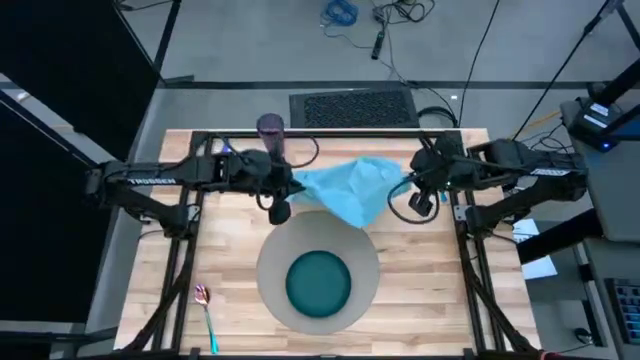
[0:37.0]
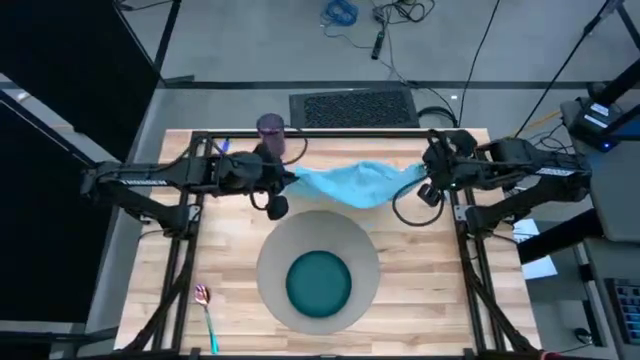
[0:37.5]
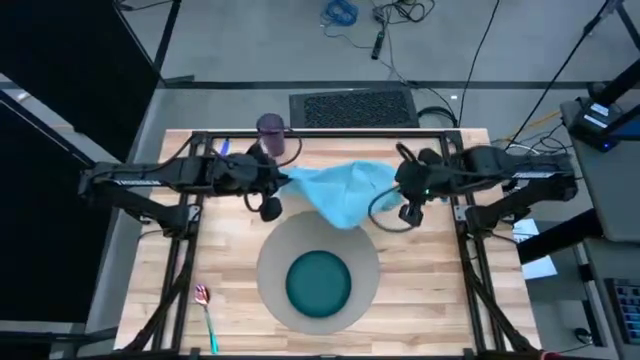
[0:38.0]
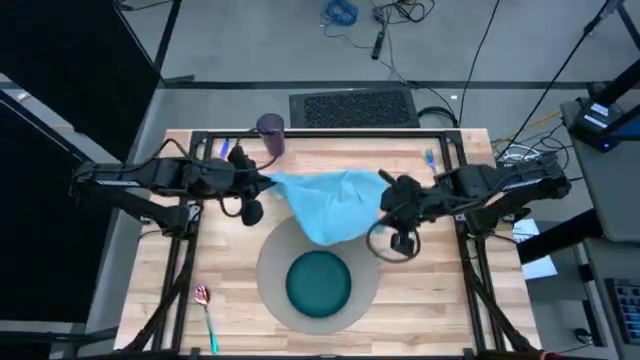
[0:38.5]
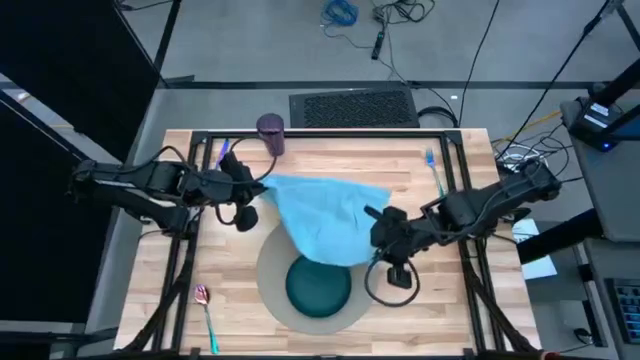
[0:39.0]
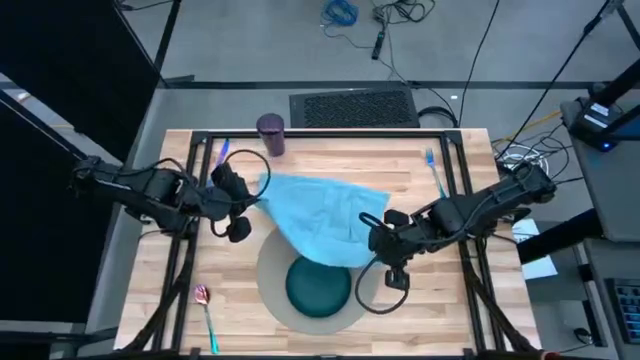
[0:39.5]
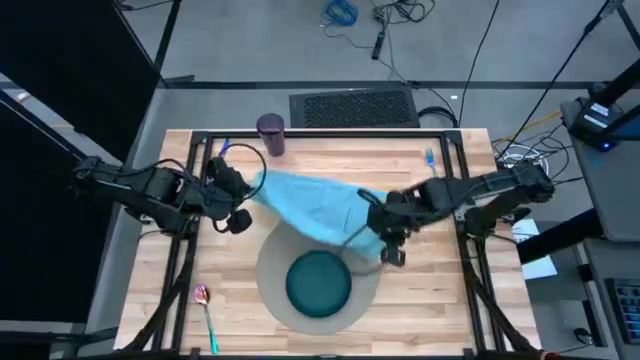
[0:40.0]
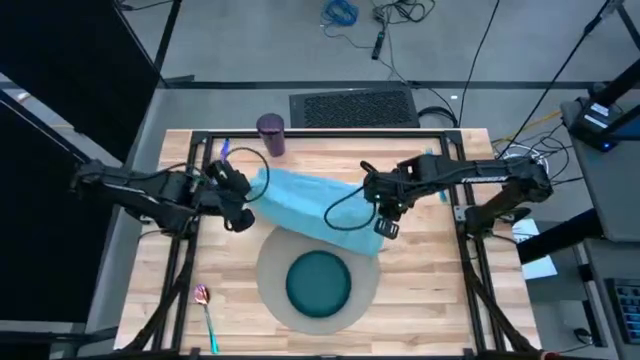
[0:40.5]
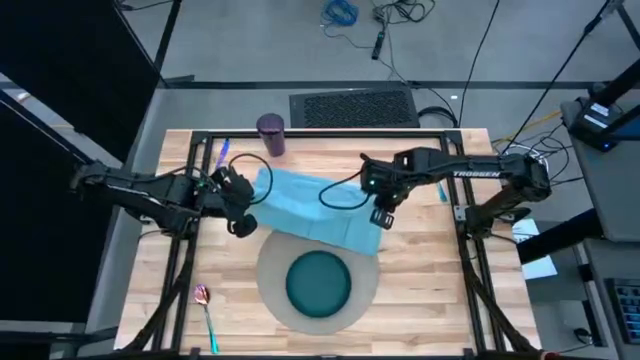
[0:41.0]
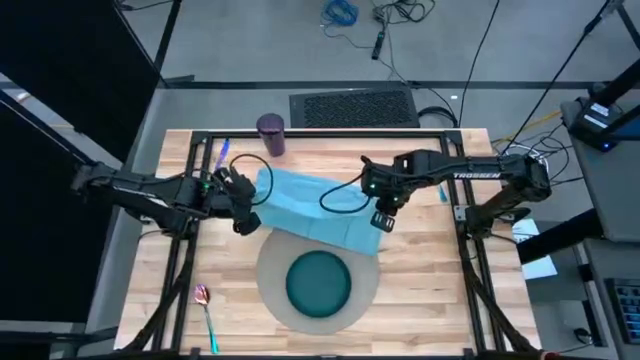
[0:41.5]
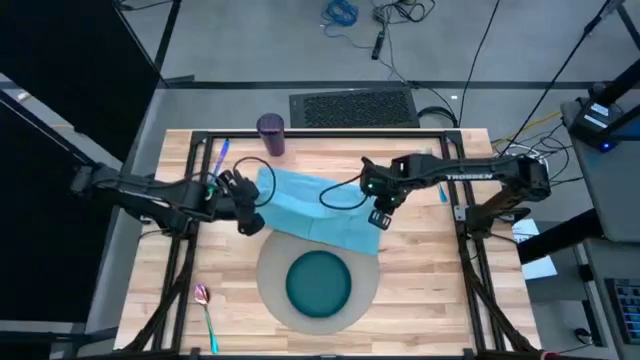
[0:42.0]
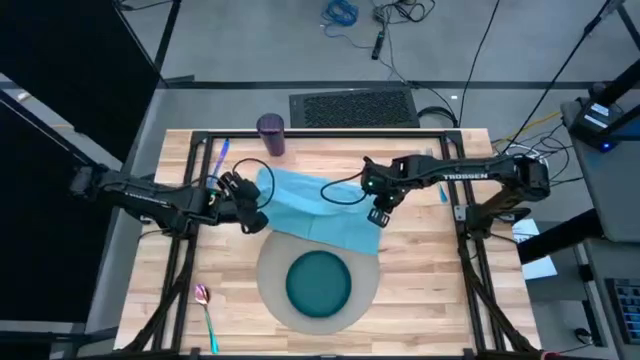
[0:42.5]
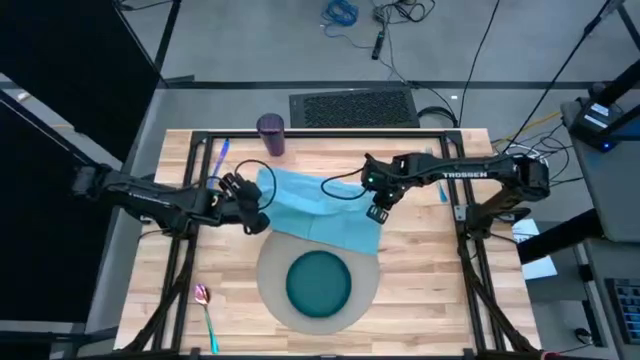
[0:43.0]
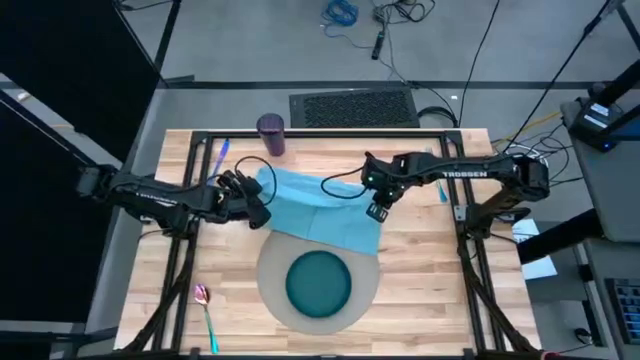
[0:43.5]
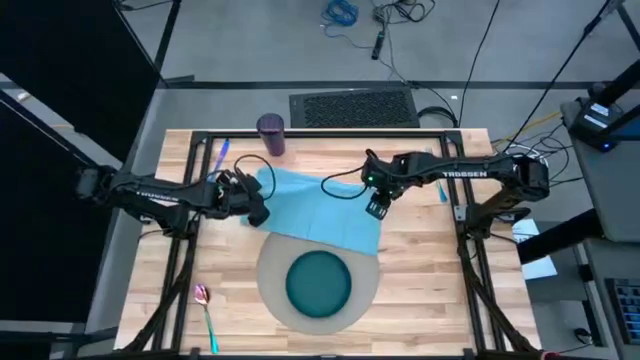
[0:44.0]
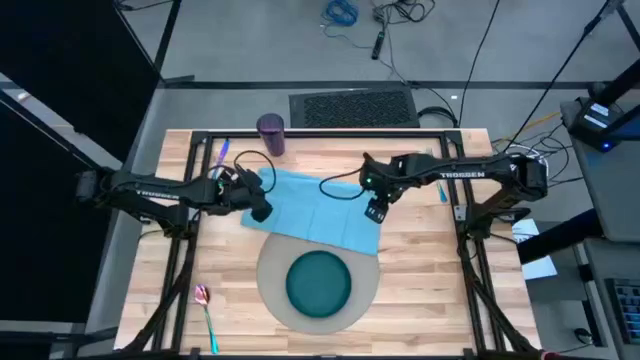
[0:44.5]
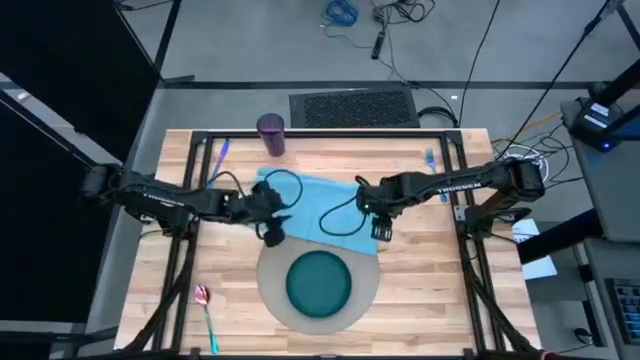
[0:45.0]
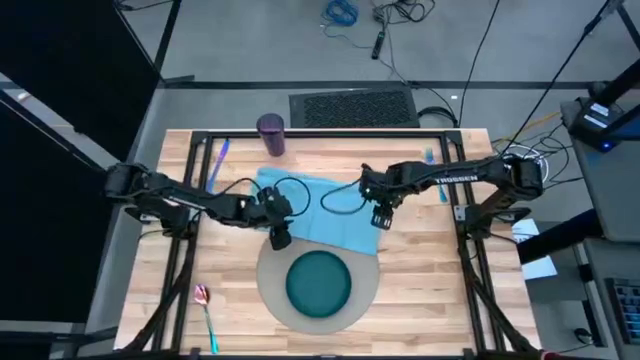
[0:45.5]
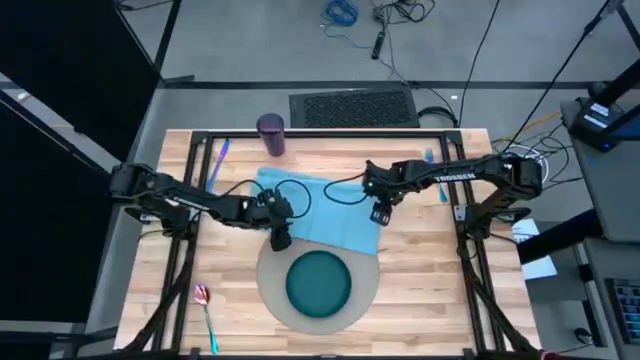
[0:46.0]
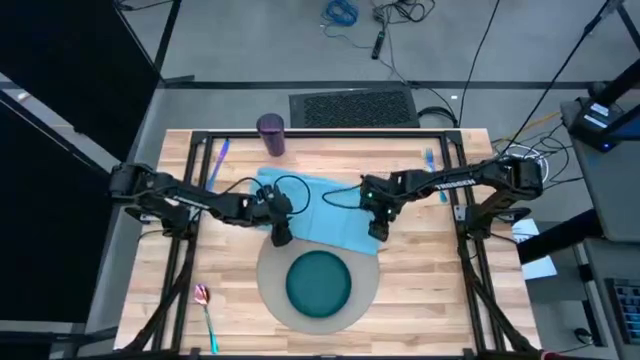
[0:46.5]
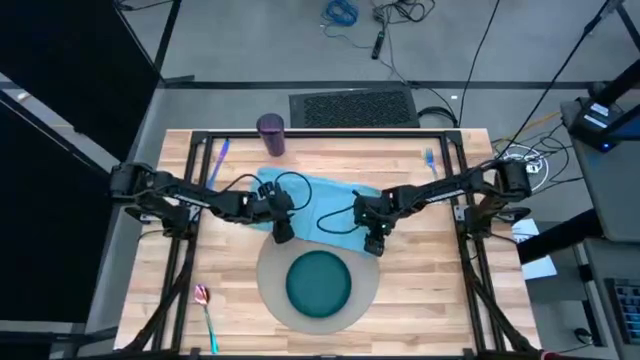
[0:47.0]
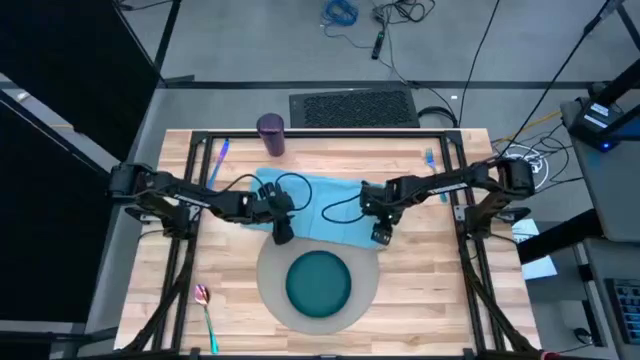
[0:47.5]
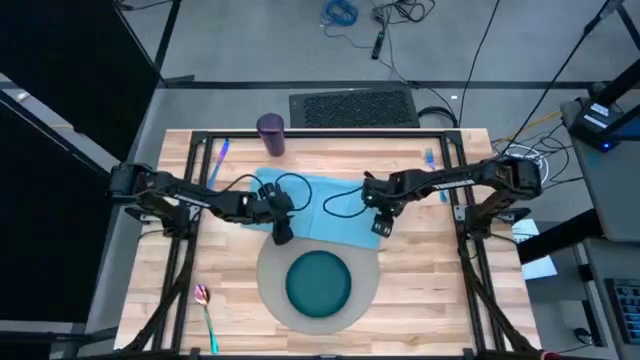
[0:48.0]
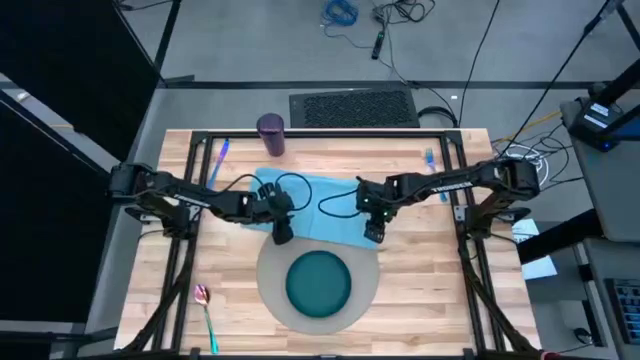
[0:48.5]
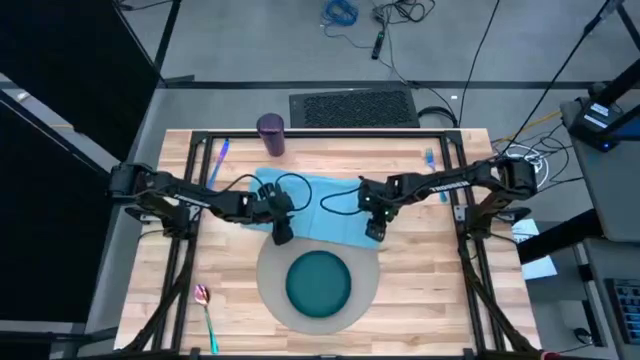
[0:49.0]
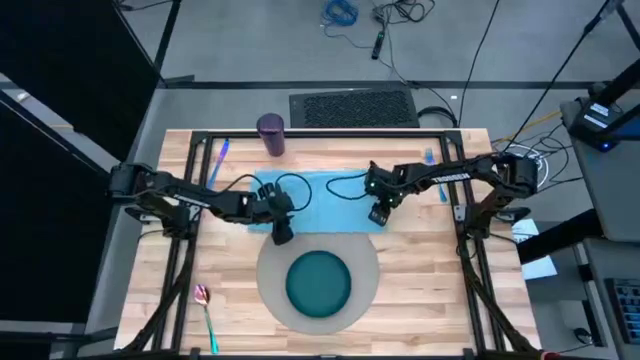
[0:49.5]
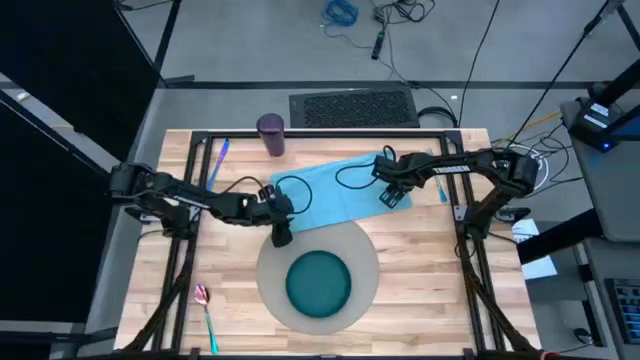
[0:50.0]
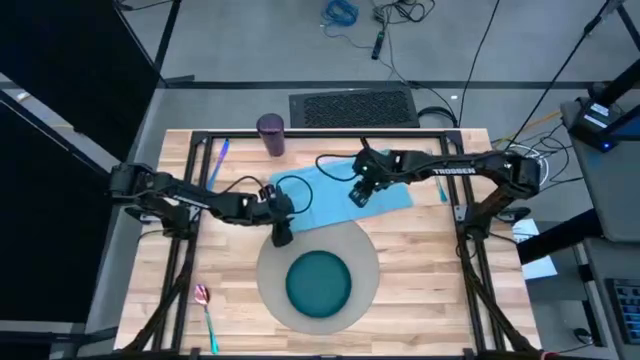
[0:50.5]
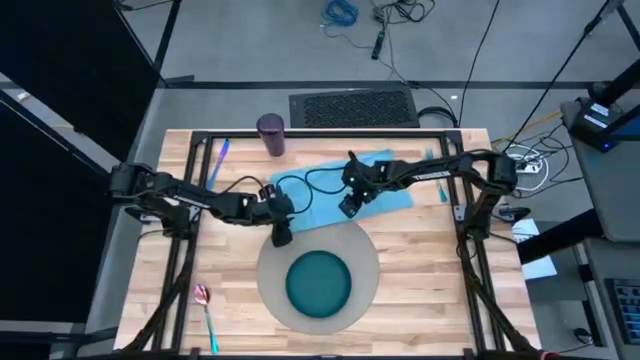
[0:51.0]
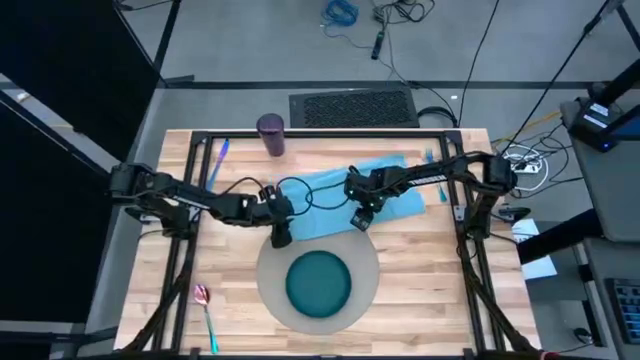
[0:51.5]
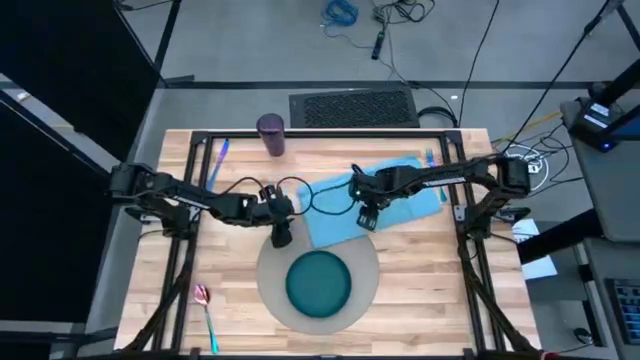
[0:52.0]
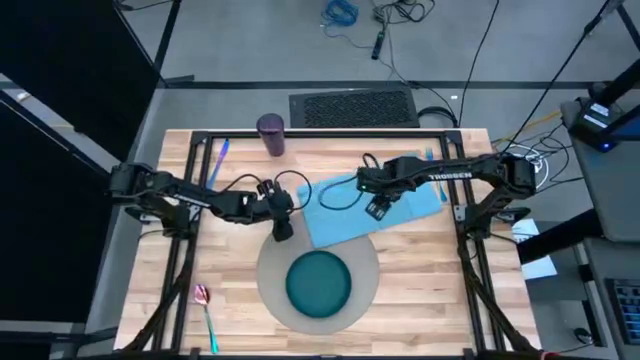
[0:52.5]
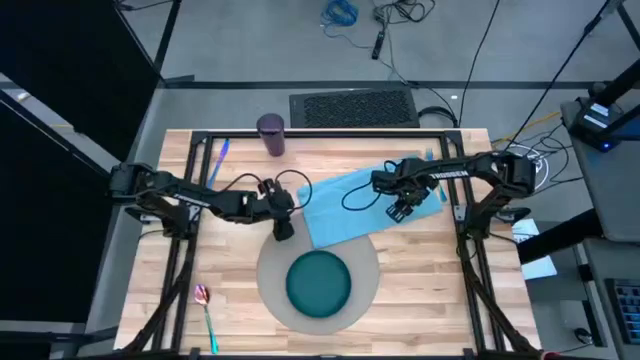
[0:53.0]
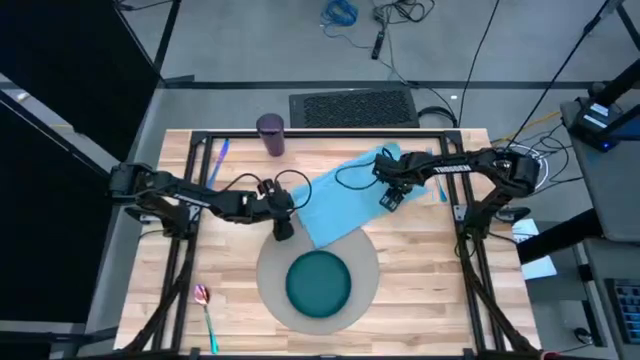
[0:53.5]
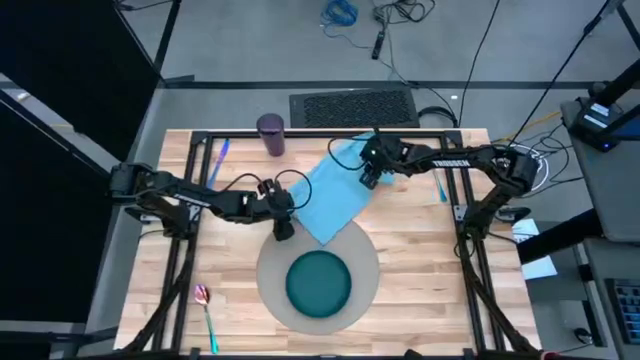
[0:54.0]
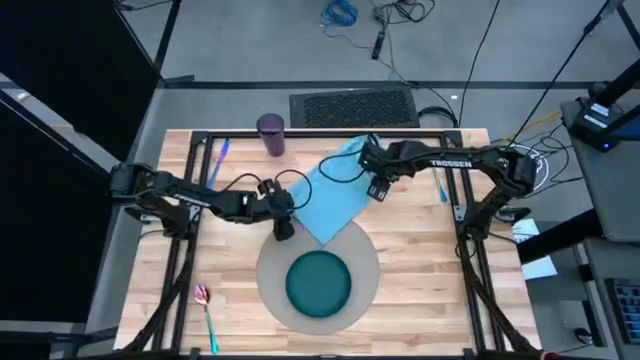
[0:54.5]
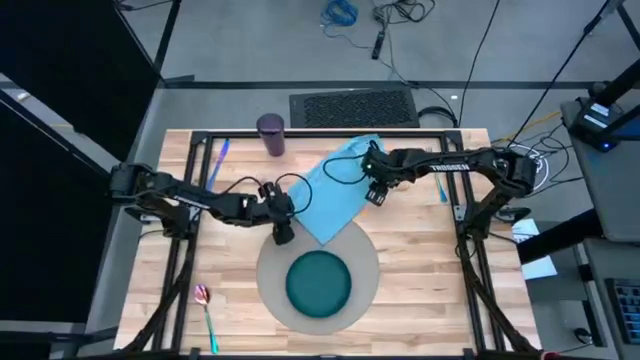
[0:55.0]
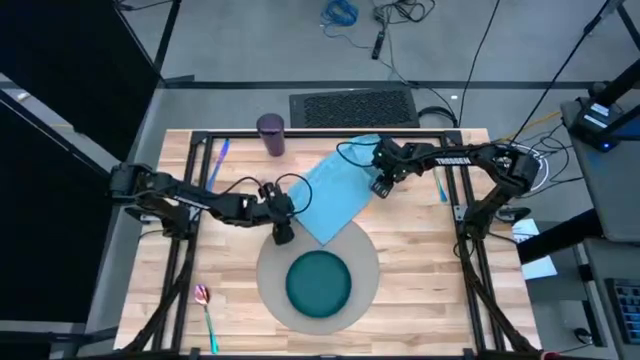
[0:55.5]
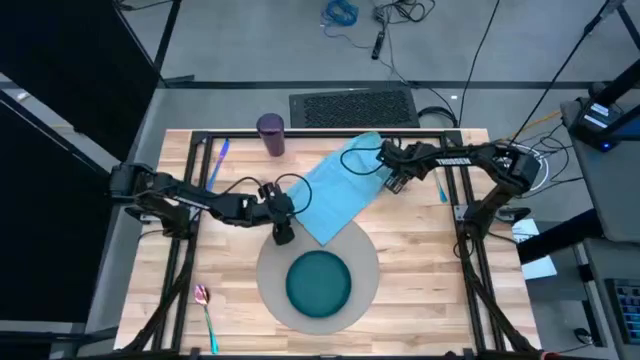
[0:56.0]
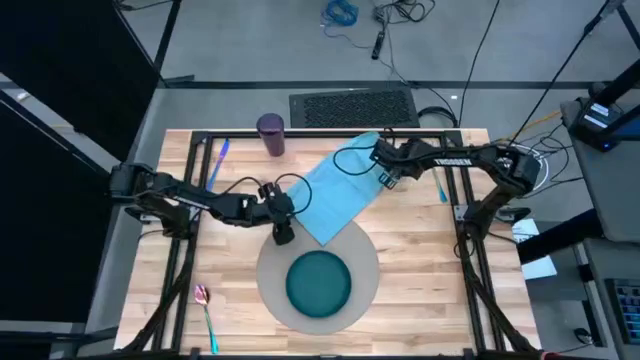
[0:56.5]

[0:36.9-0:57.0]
Task: Set table place
Fold the blue table napkin

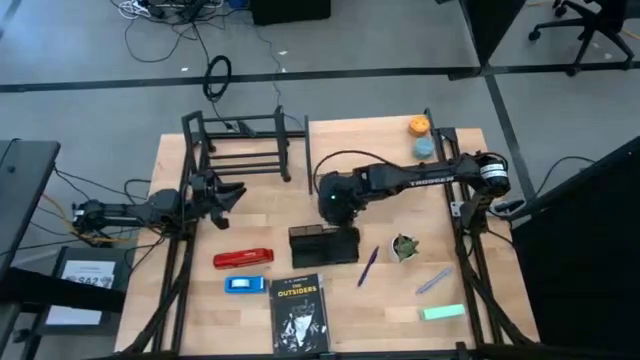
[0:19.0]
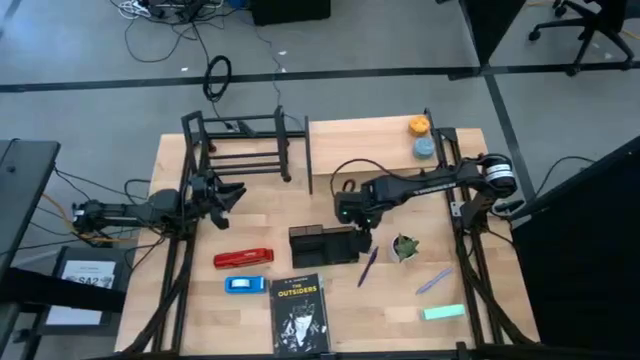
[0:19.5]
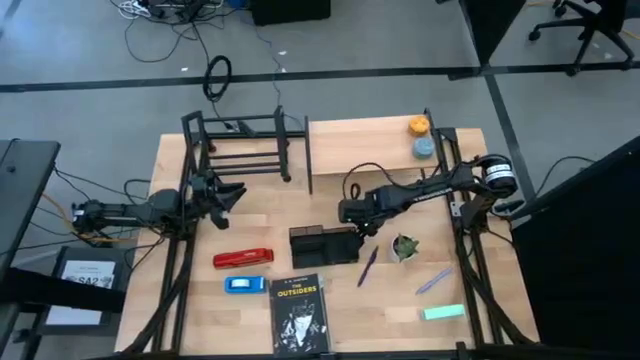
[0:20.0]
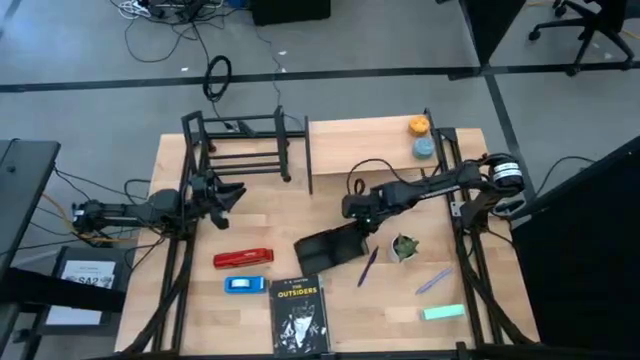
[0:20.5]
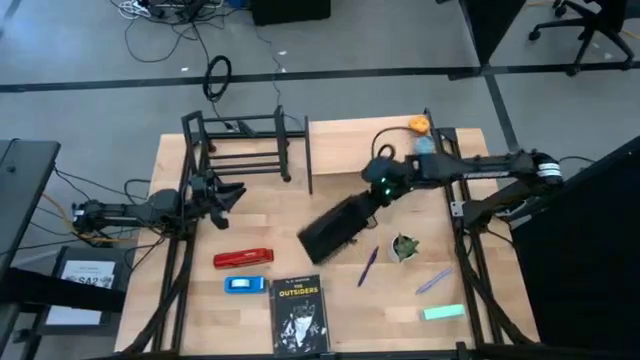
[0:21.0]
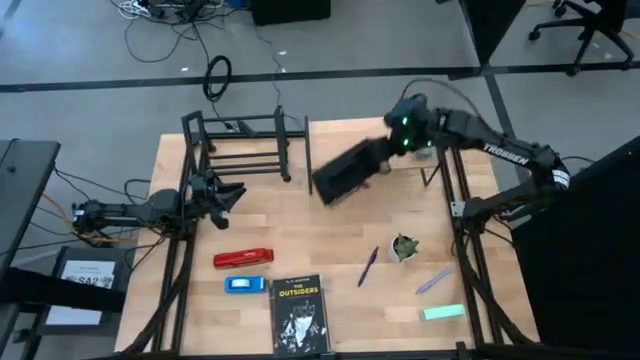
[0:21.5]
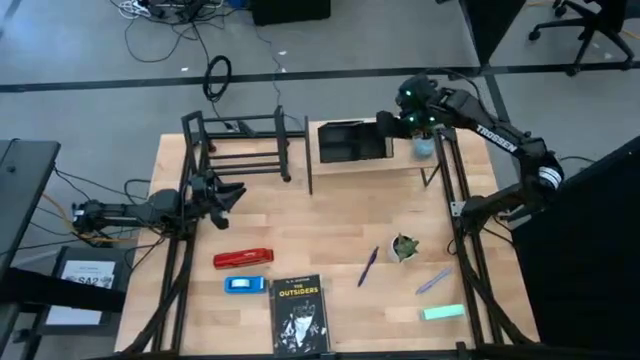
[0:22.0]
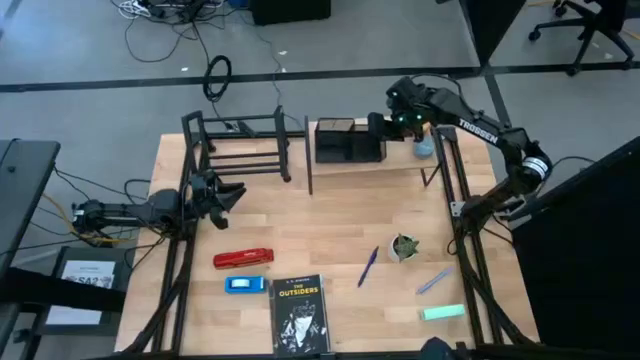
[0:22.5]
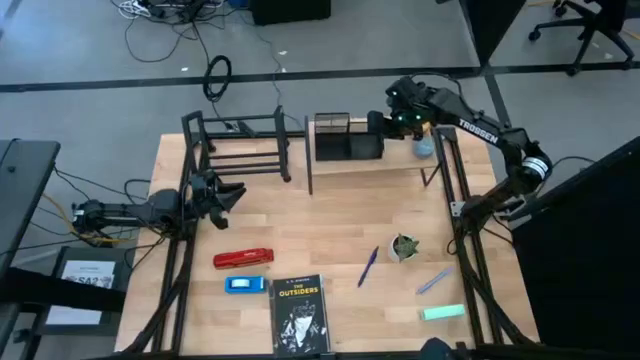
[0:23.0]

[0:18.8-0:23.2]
Task: Stock shelves
Put the black desk organizer on the shelf
